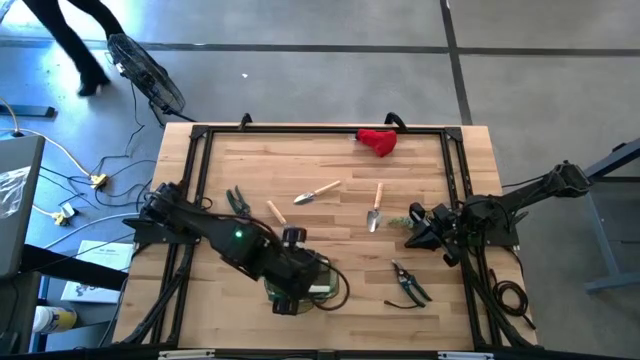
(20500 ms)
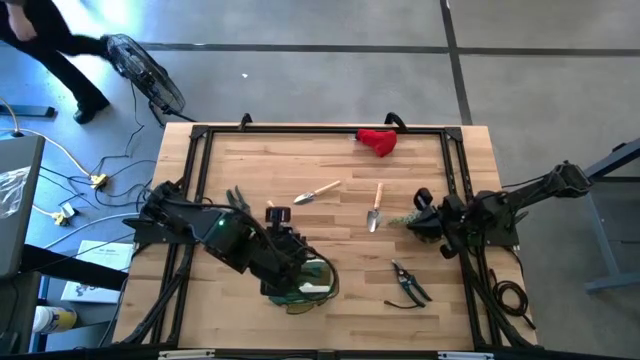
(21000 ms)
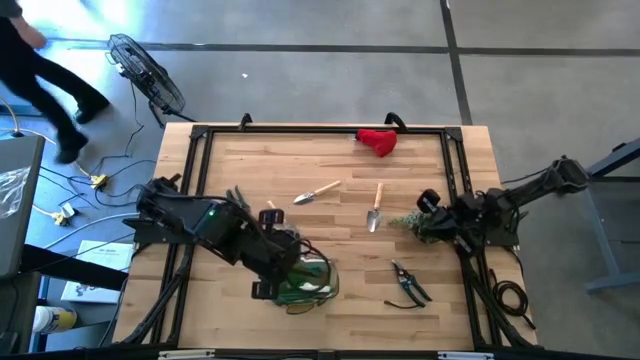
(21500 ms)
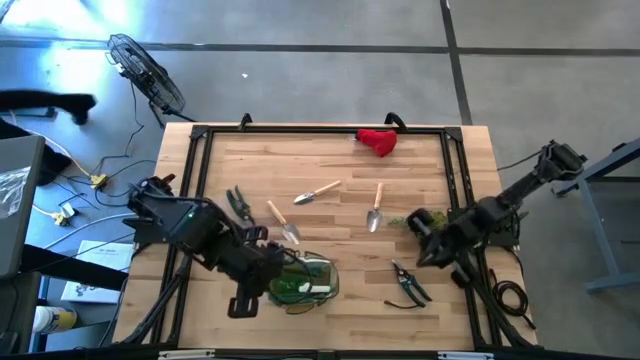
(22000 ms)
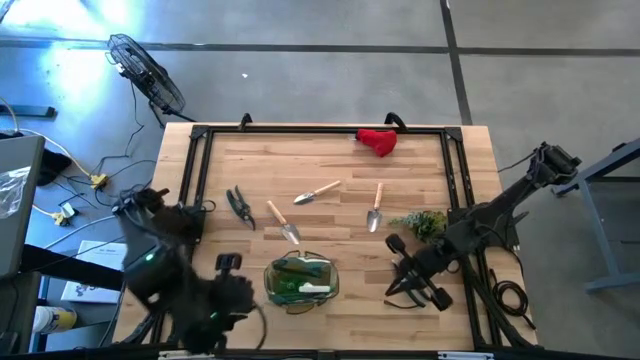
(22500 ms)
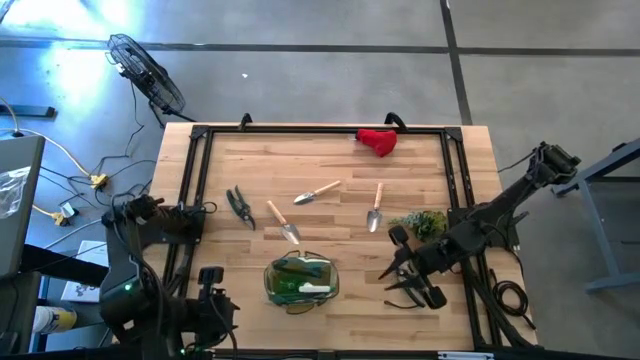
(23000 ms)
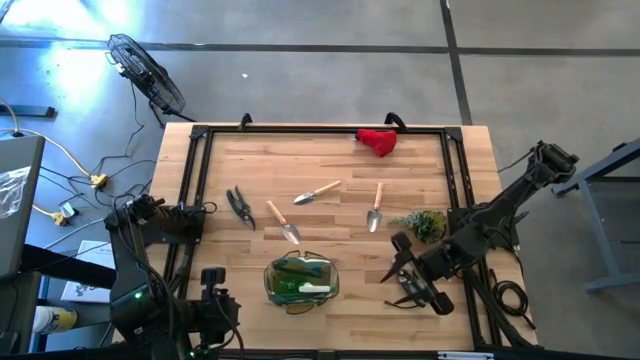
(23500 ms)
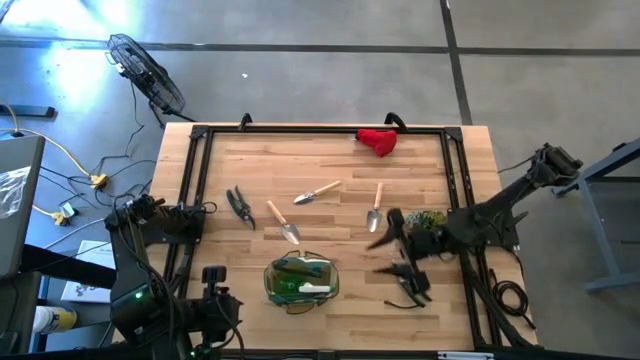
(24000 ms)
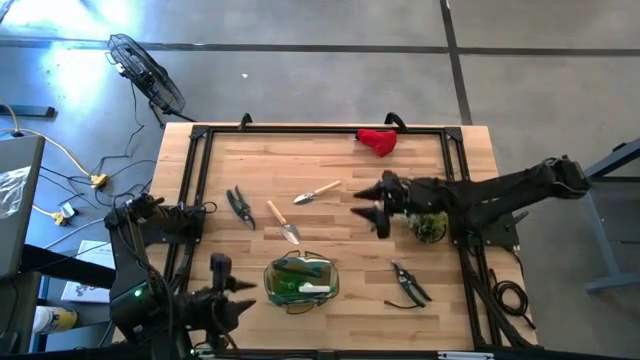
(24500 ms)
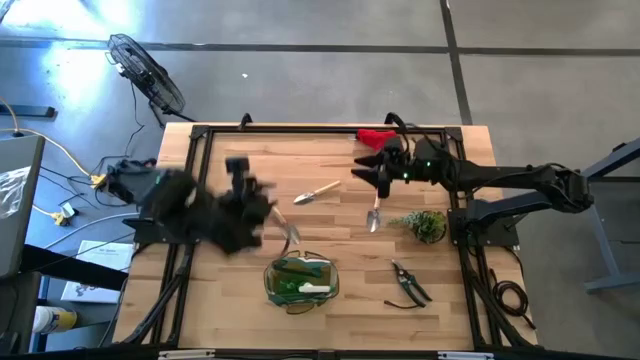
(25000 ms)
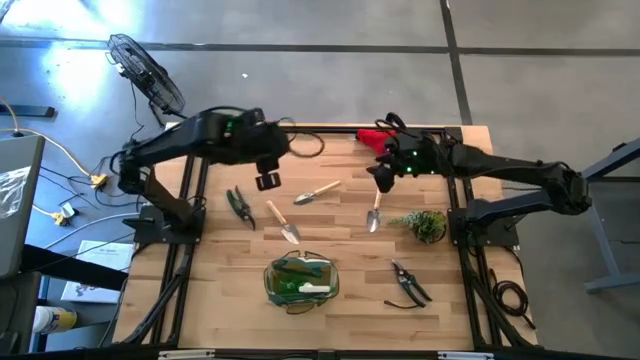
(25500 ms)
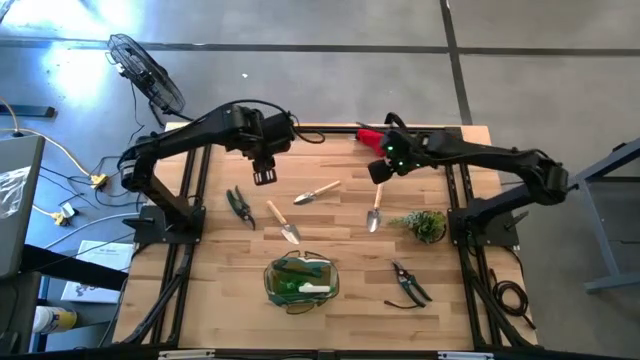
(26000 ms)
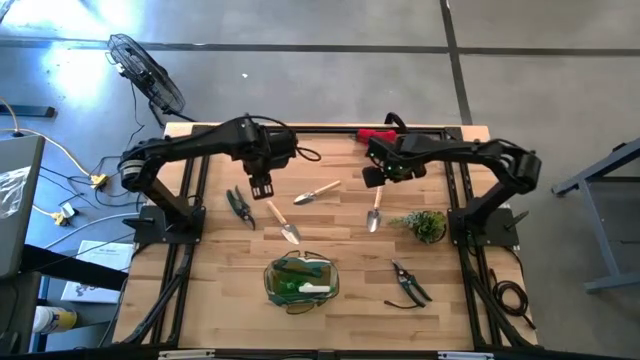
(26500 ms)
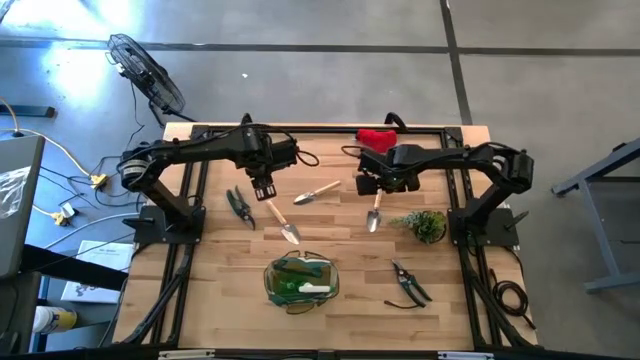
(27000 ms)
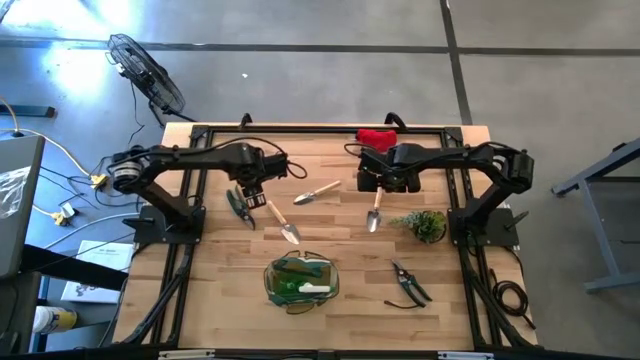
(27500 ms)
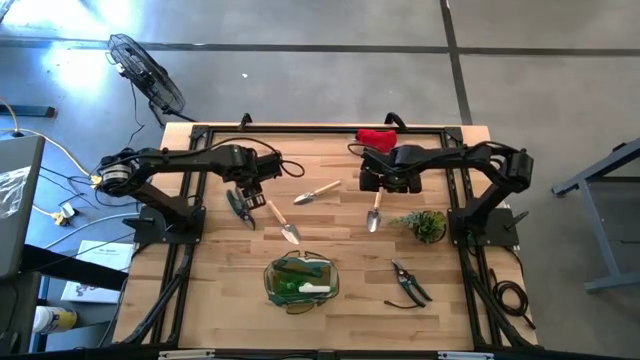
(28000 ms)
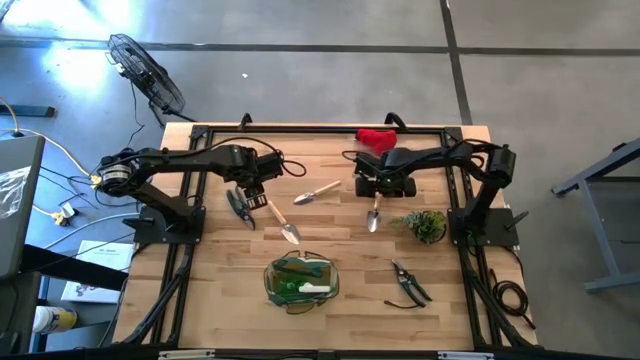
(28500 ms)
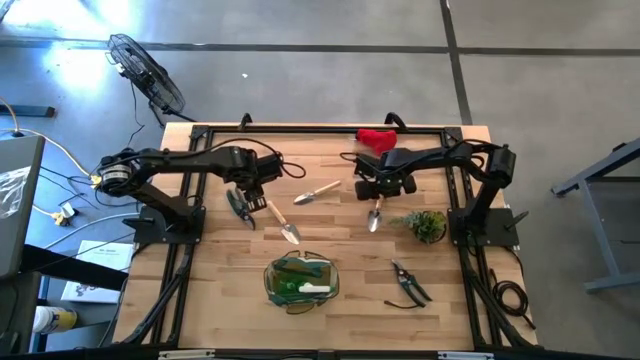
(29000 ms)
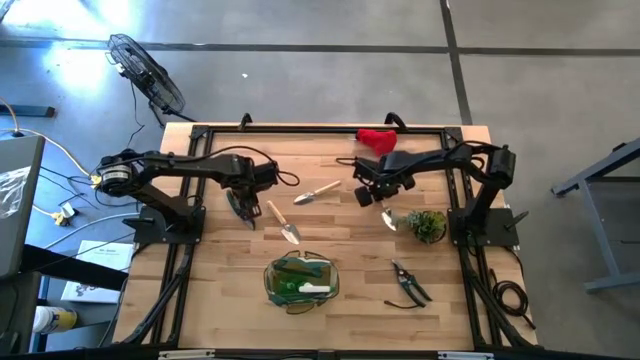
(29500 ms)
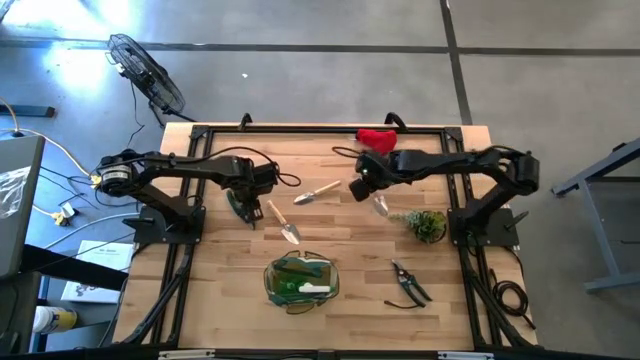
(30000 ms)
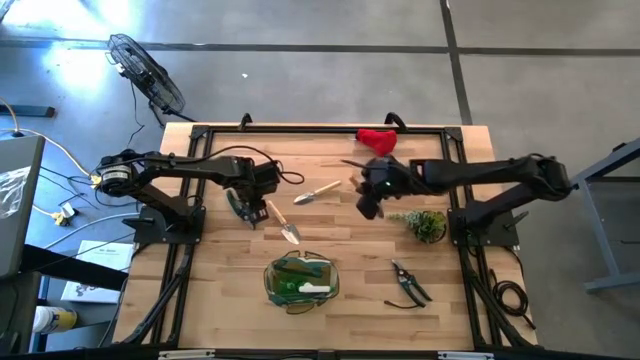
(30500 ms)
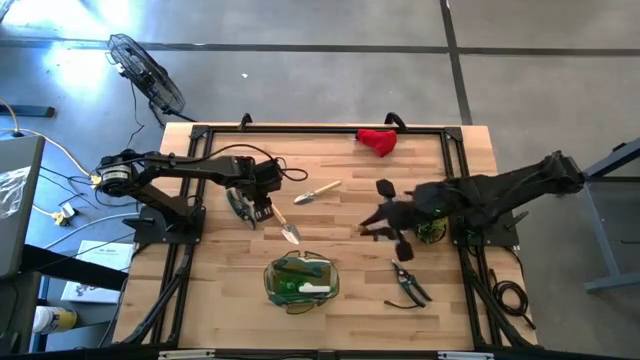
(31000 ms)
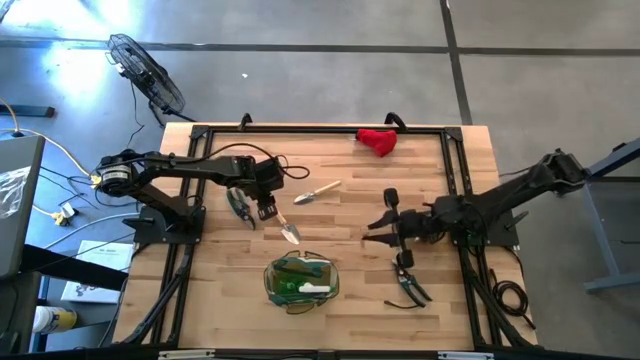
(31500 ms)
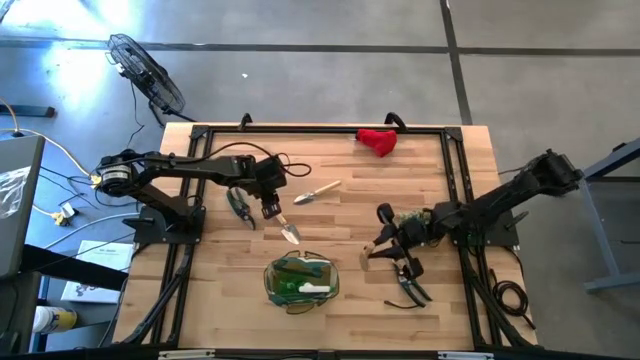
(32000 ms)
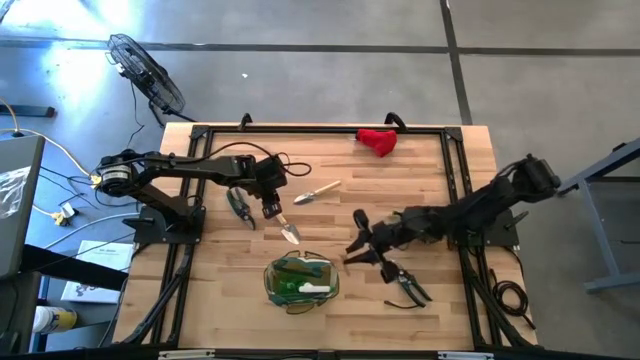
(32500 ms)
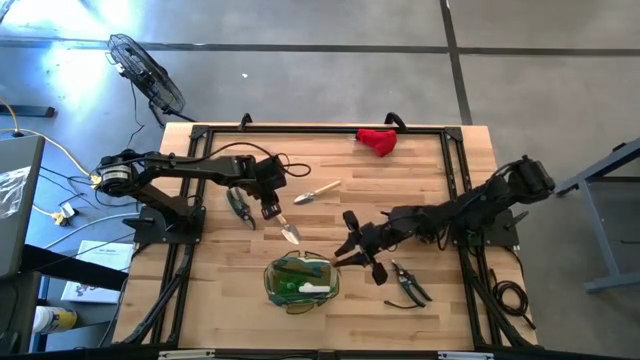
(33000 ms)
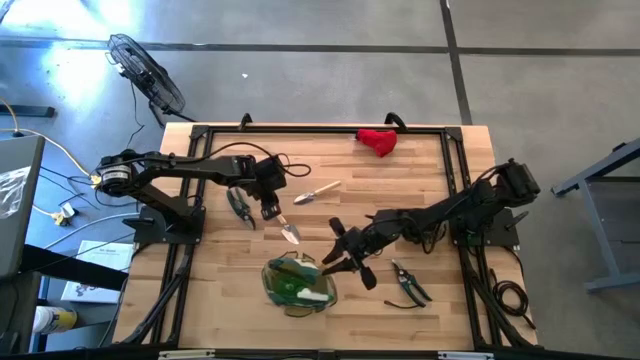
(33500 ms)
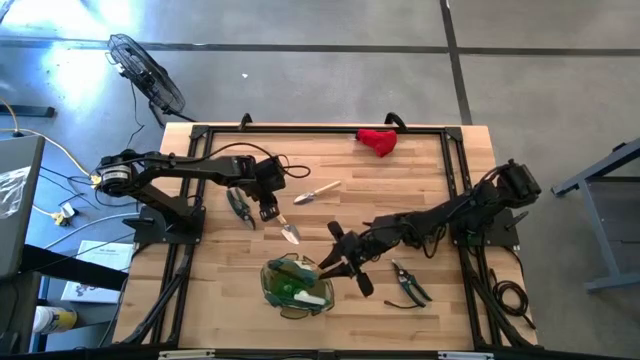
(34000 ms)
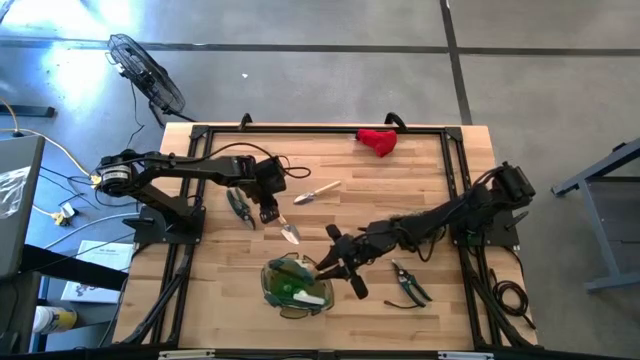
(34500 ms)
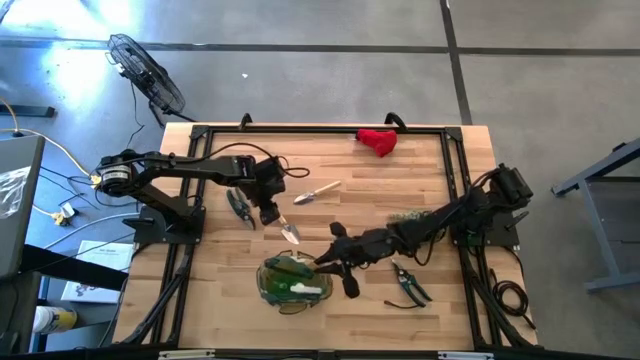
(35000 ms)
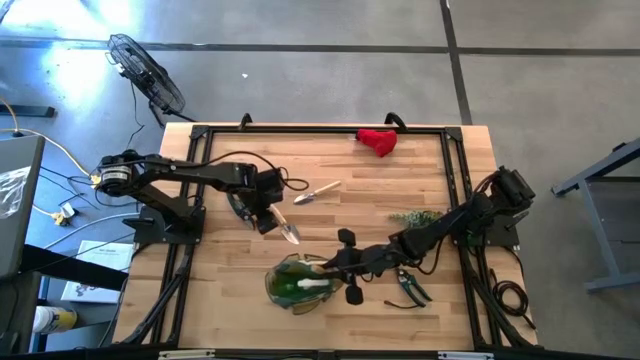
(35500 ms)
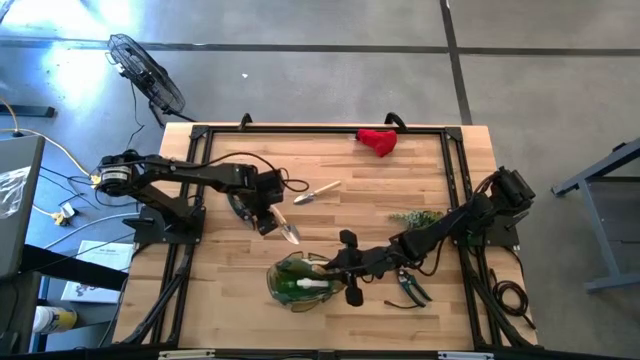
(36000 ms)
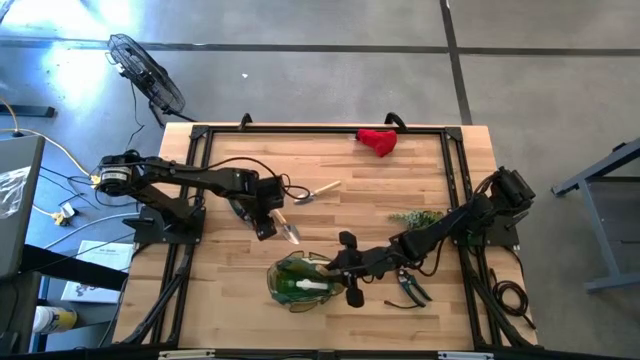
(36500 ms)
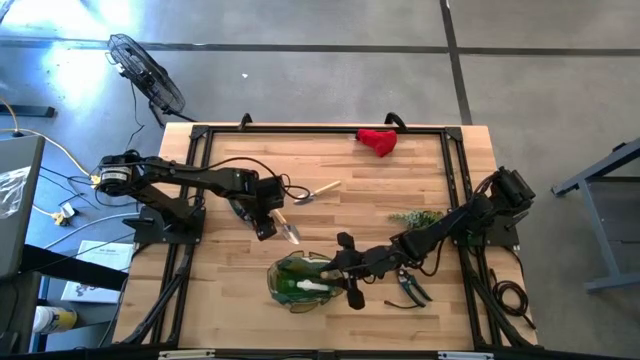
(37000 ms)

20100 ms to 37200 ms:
Task: Pick & Place Garden tools in Gardening bag
Put the top right brown trowel into the gardening bag

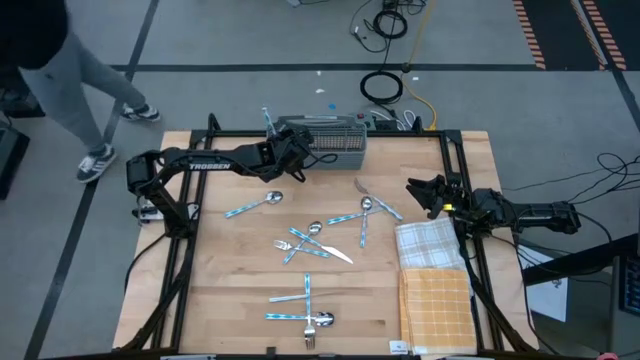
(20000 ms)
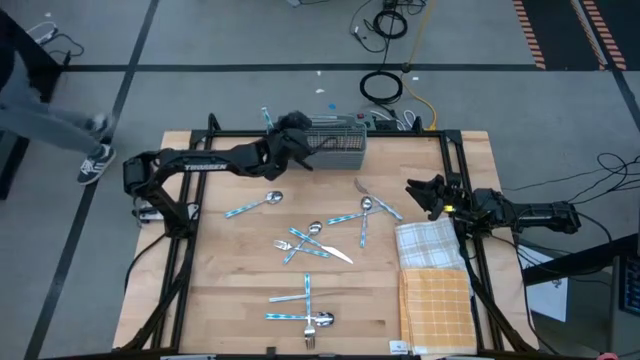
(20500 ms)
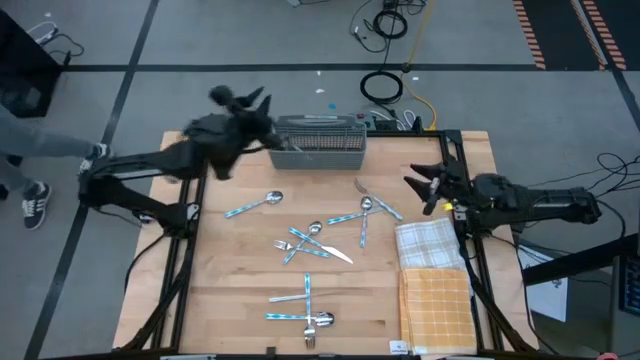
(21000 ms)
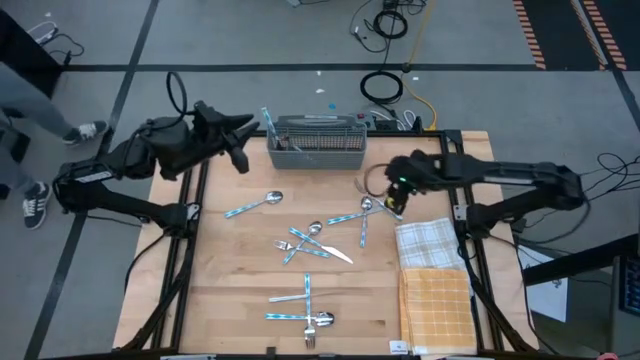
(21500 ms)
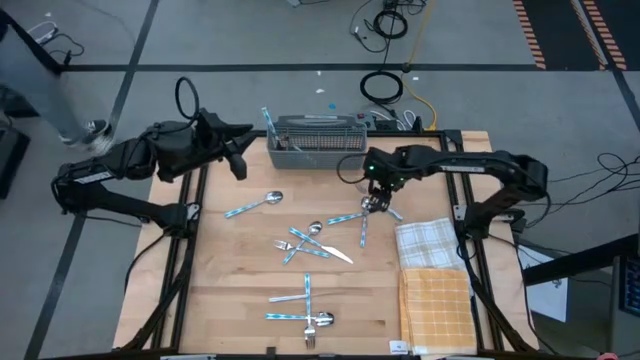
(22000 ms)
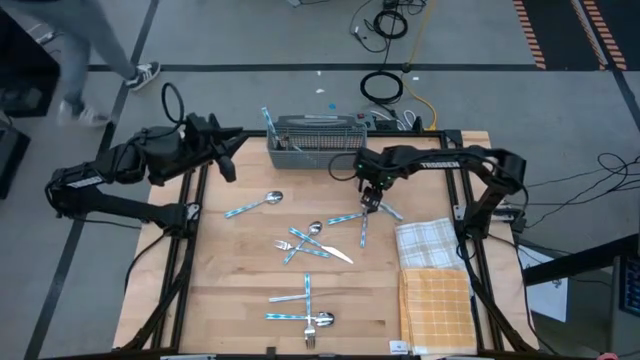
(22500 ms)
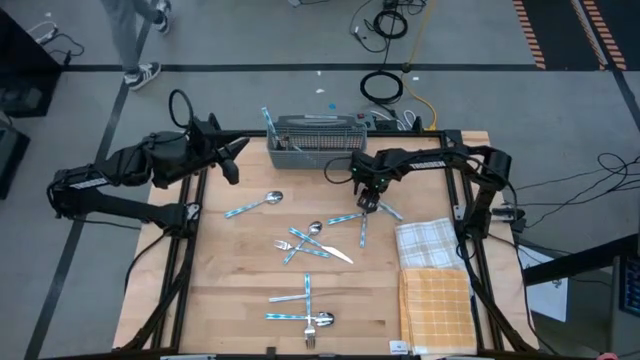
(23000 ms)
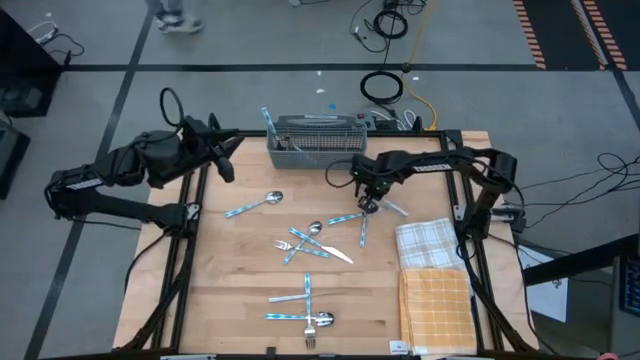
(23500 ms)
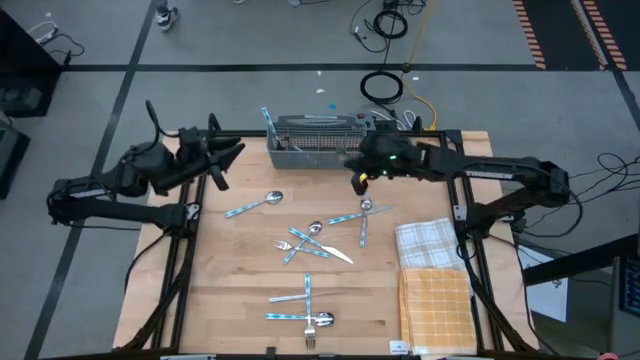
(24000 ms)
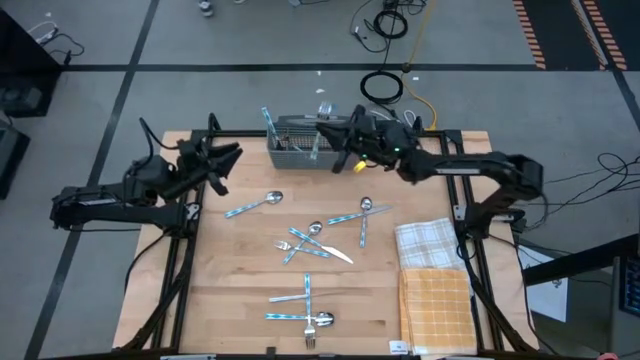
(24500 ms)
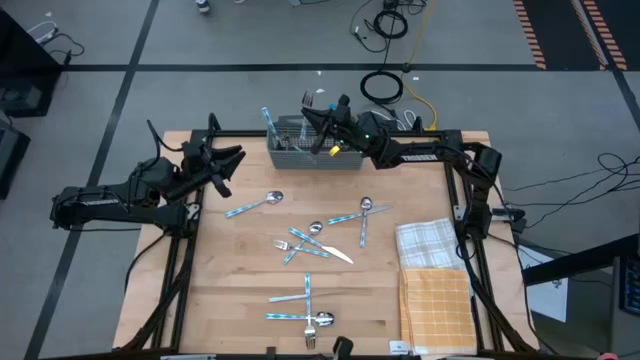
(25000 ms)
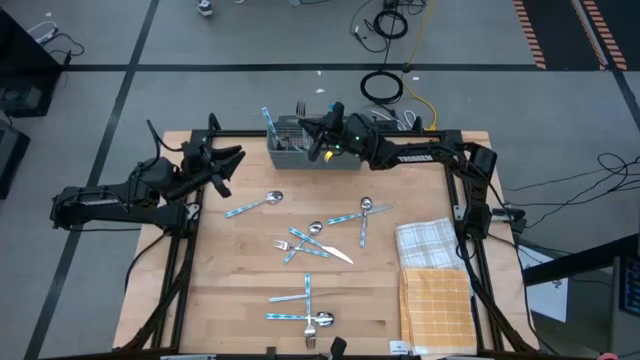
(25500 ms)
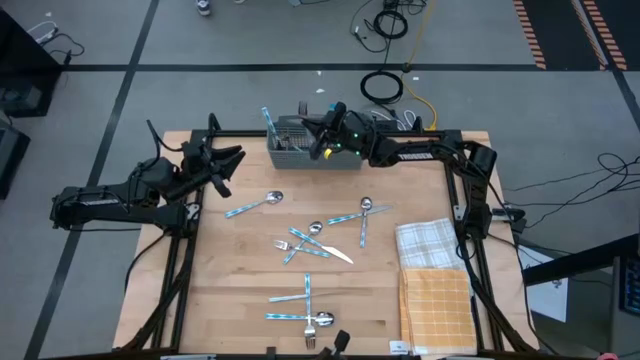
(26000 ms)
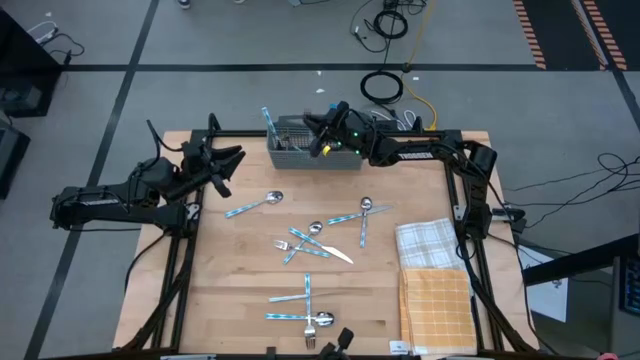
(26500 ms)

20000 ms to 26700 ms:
Task: Sort silverware
Put the top fork into the middle left section of the utensil holder
